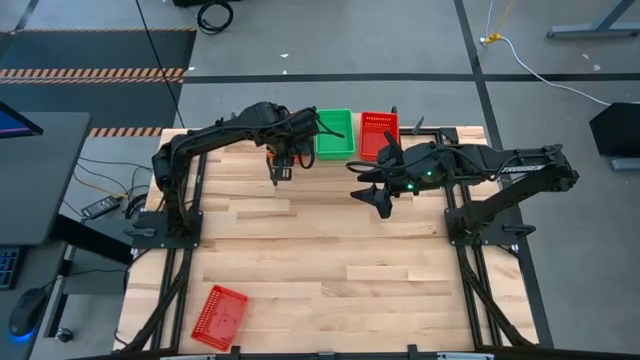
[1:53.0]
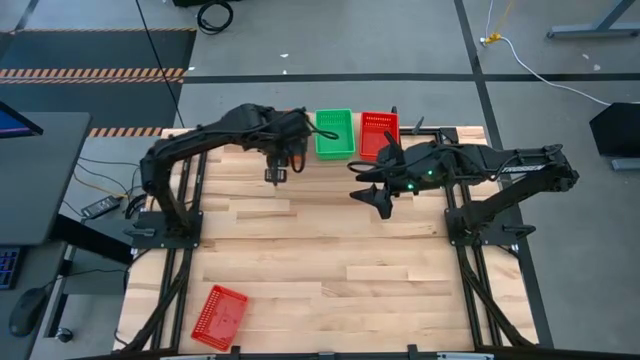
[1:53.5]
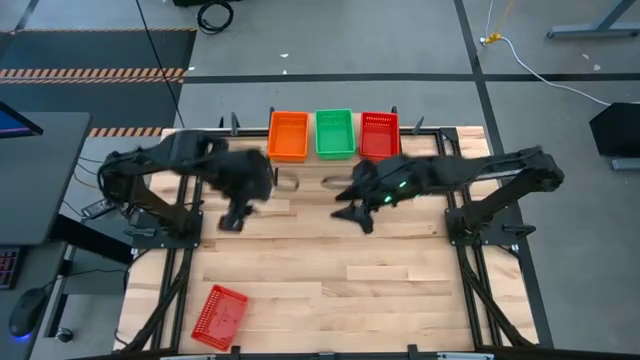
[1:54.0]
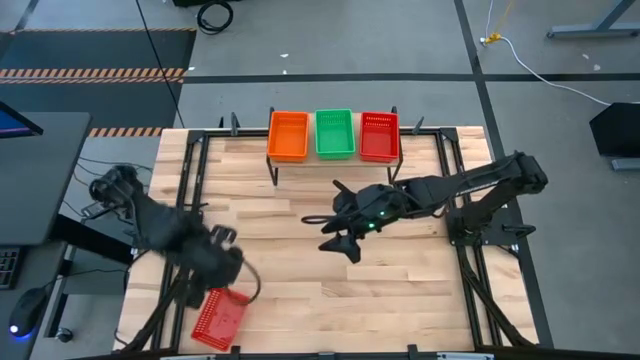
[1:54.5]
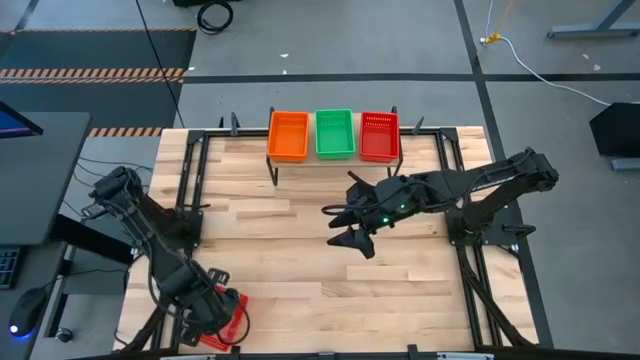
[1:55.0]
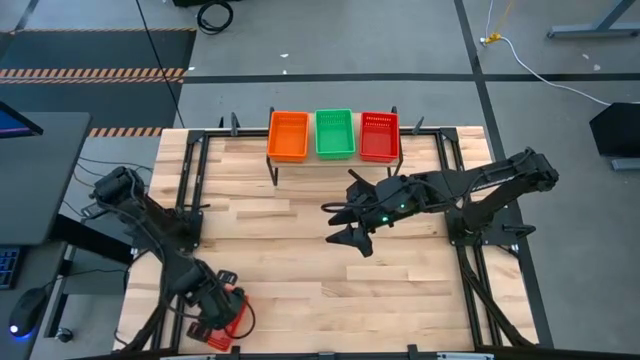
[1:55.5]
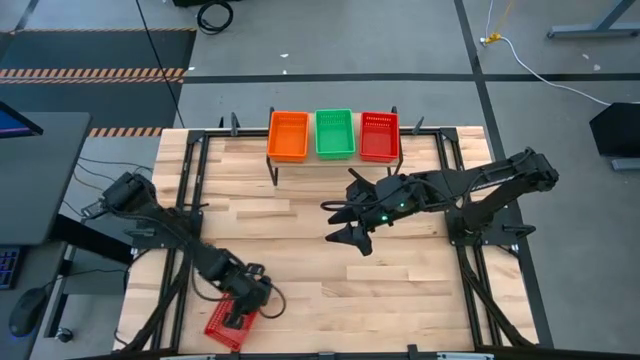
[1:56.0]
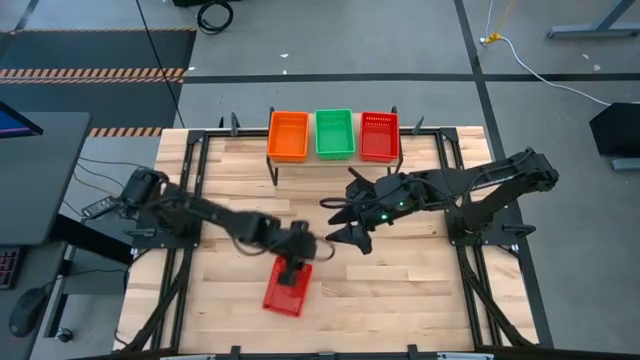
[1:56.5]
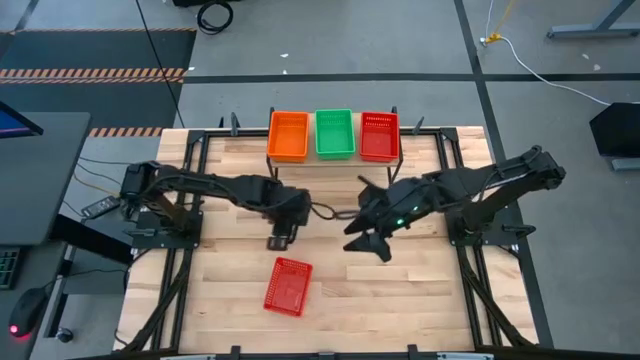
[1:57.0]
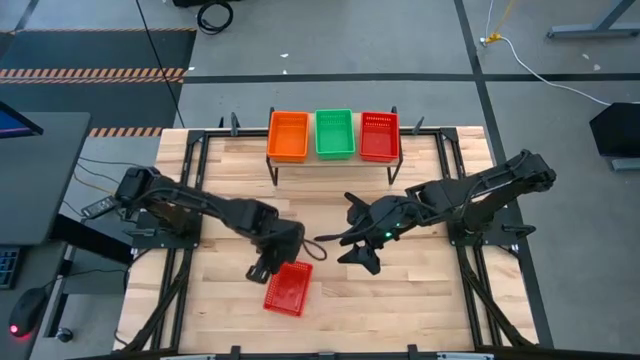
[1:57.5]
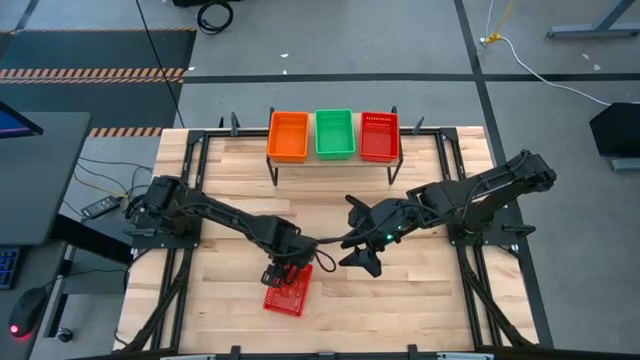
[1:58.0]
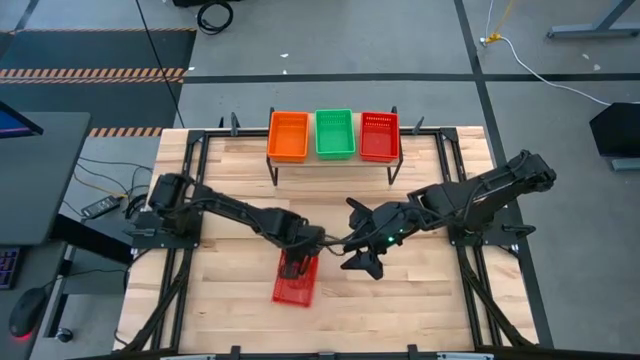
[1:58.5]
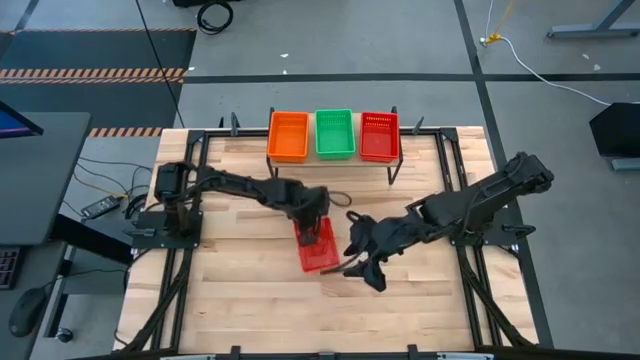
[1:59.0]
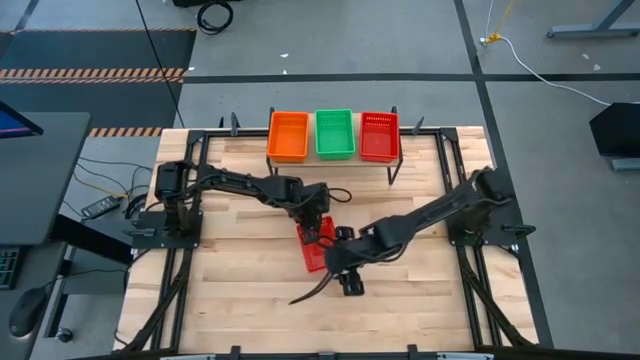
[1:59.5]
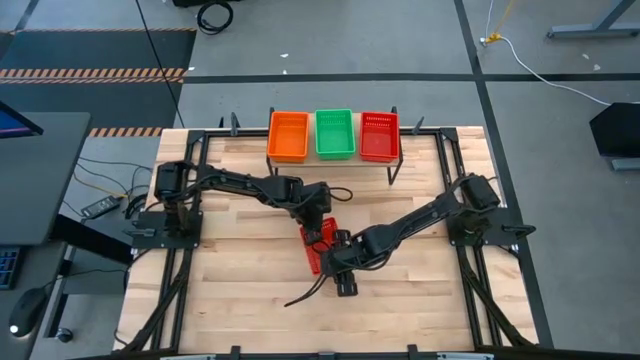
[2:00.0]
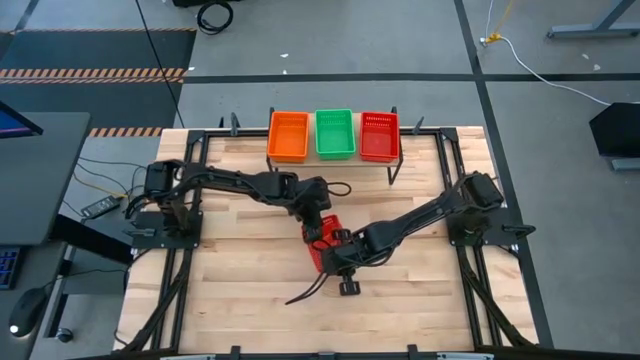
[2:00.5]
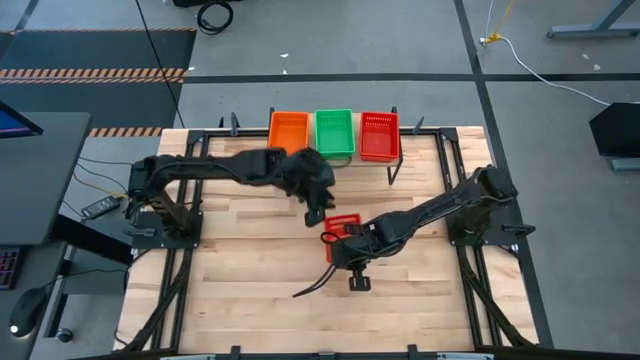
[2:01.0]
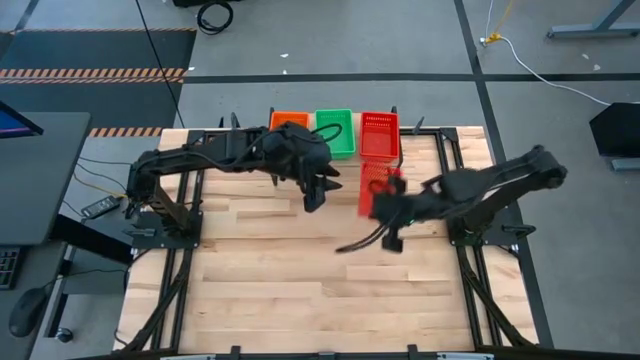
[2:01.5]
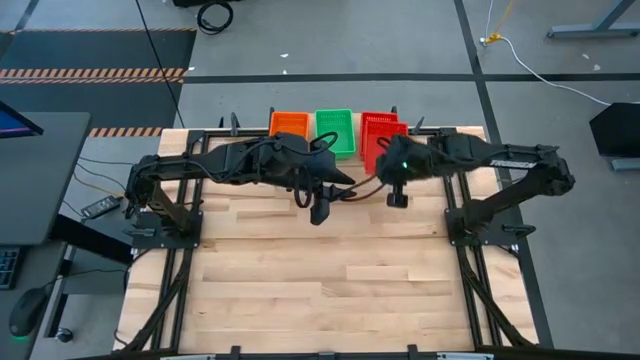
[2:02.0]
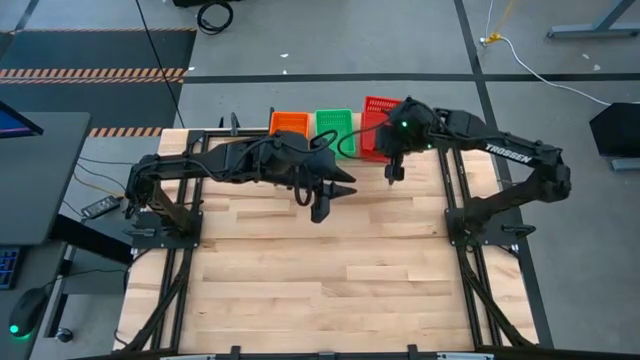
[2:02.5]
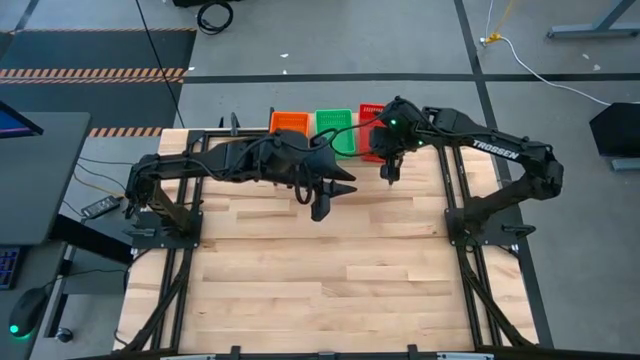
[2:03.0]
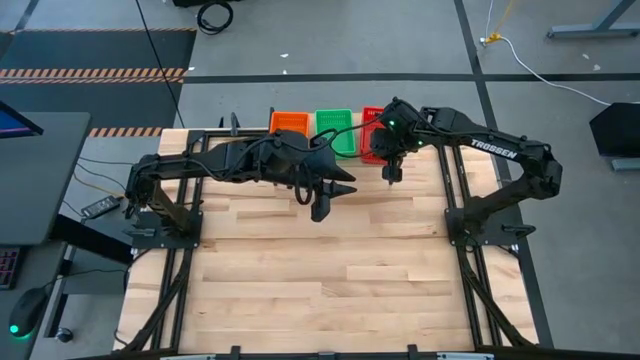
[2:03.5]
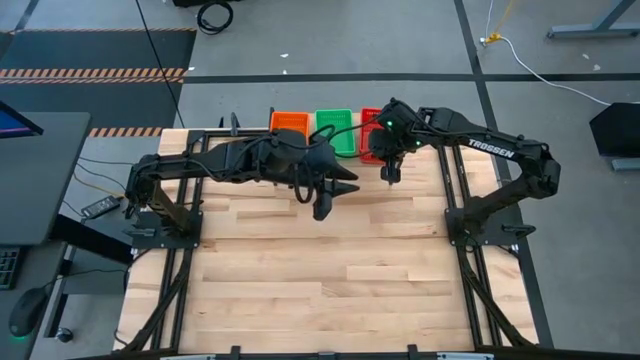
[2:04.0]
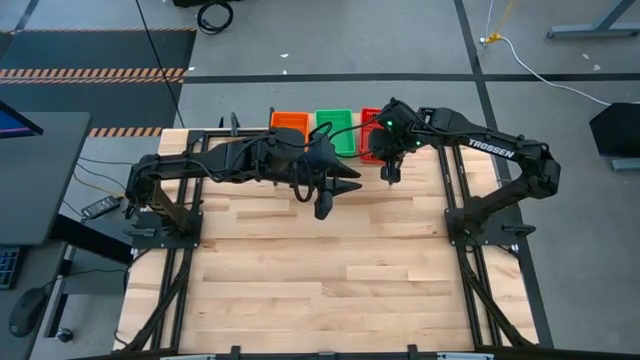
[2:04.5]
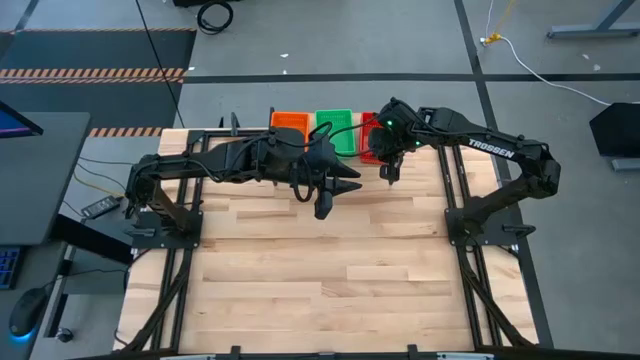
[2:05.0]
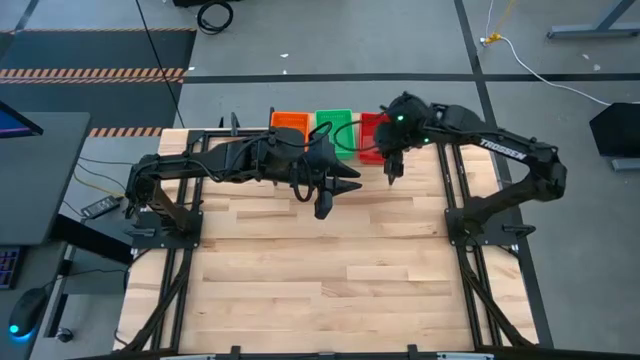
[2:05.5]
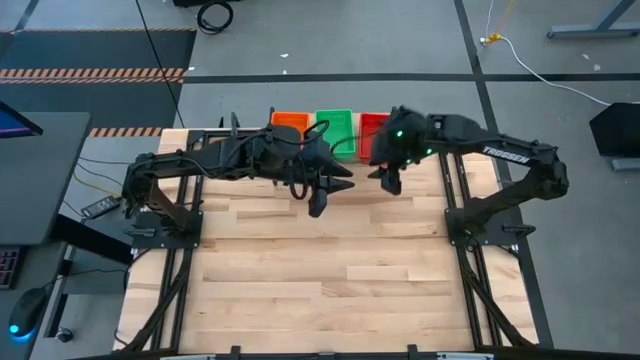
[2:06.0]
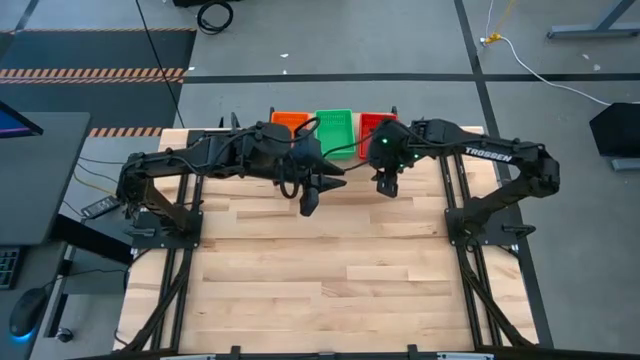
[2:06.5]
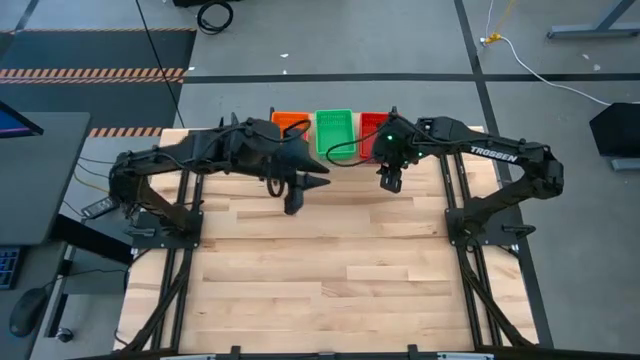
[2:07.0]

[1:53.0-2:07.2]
Task: Stack baskets on shelf by color
Stack the red bin on the red bins on the shelf

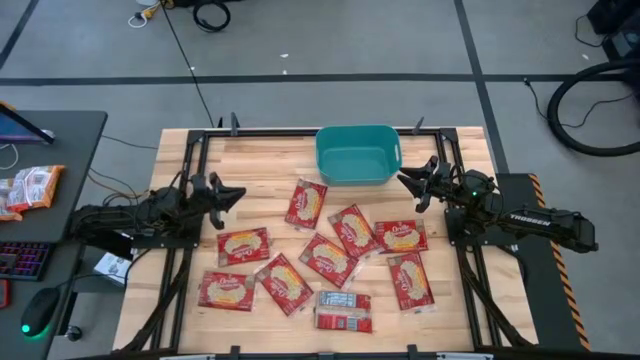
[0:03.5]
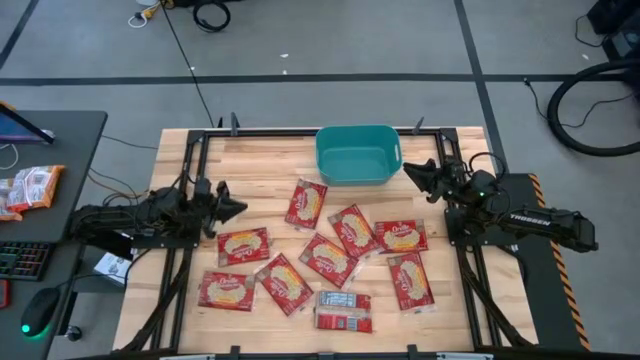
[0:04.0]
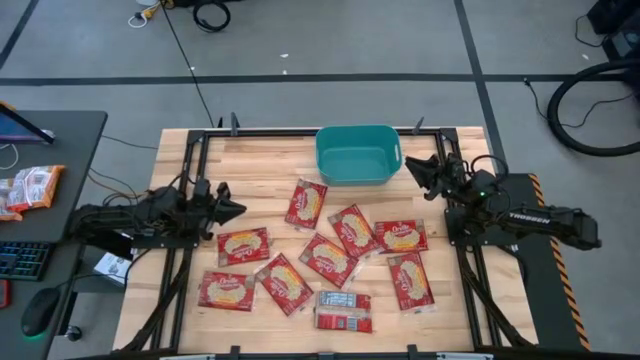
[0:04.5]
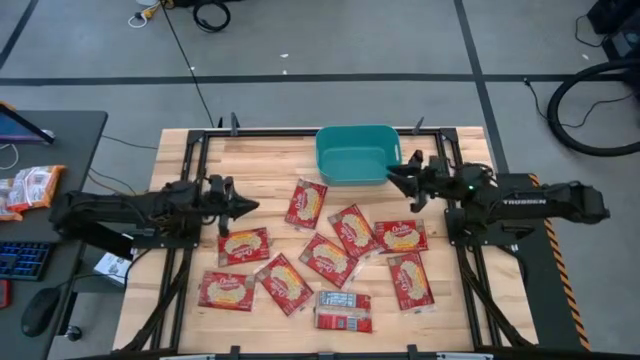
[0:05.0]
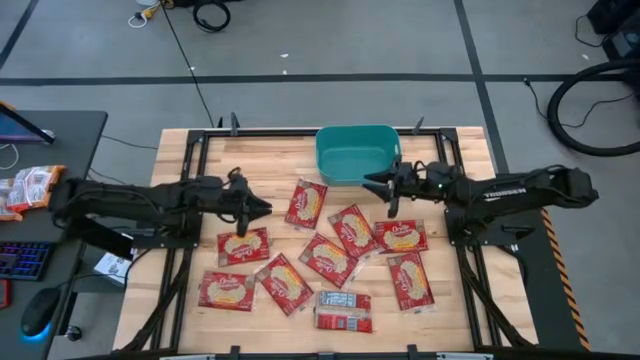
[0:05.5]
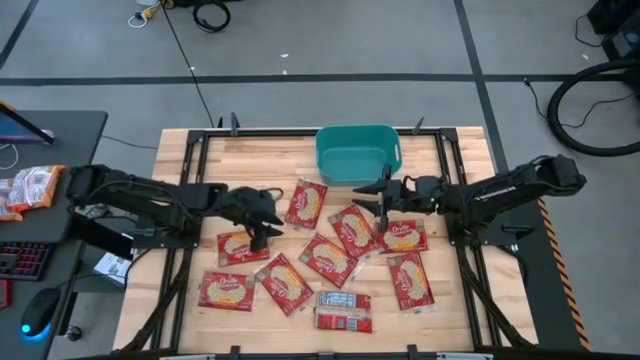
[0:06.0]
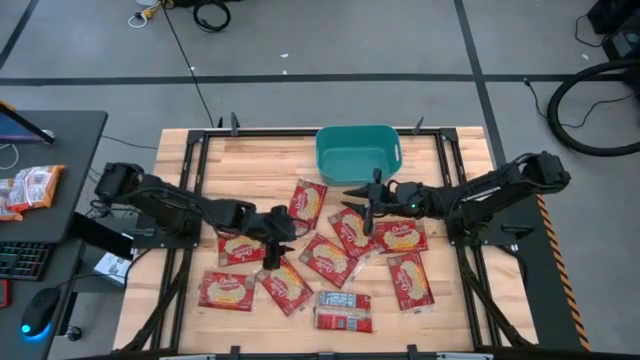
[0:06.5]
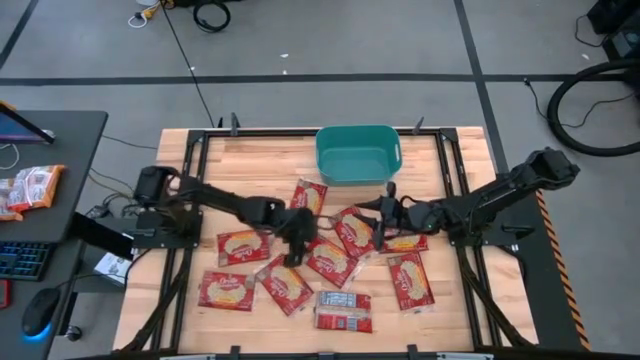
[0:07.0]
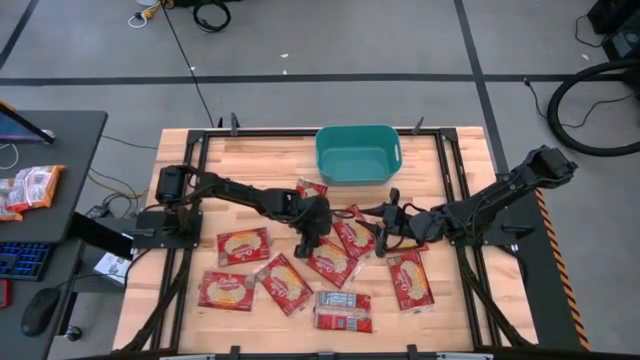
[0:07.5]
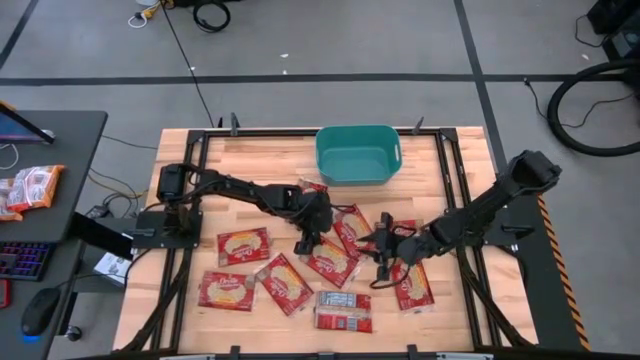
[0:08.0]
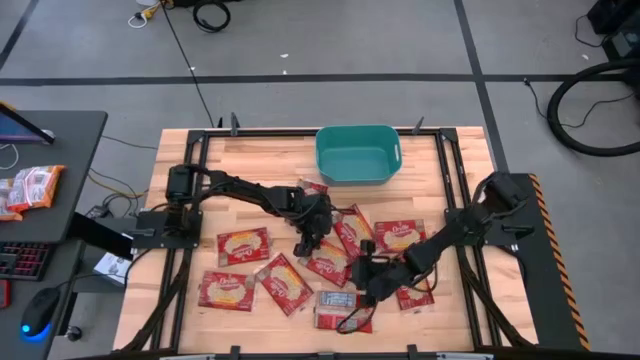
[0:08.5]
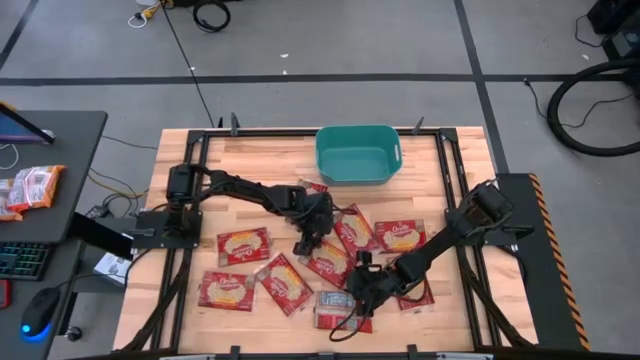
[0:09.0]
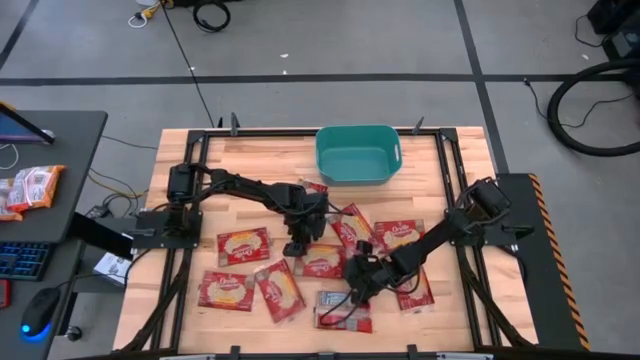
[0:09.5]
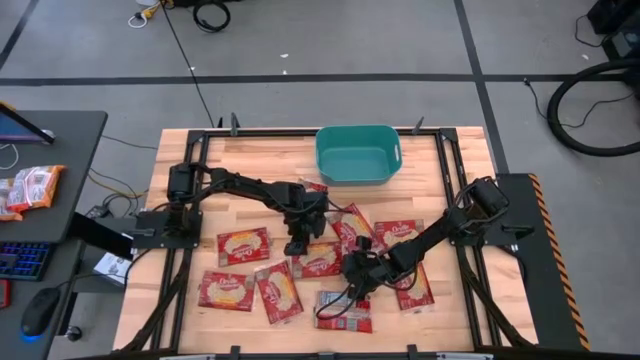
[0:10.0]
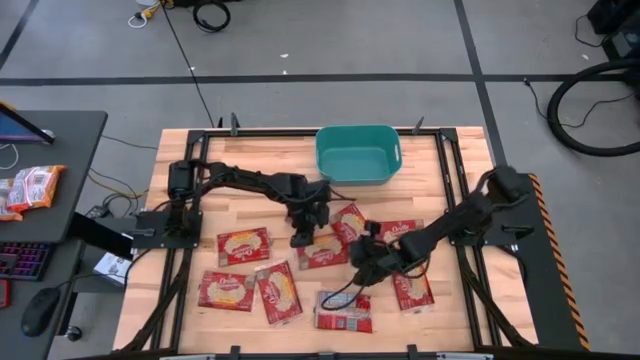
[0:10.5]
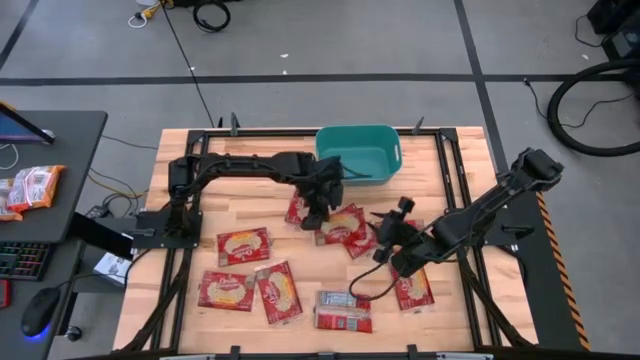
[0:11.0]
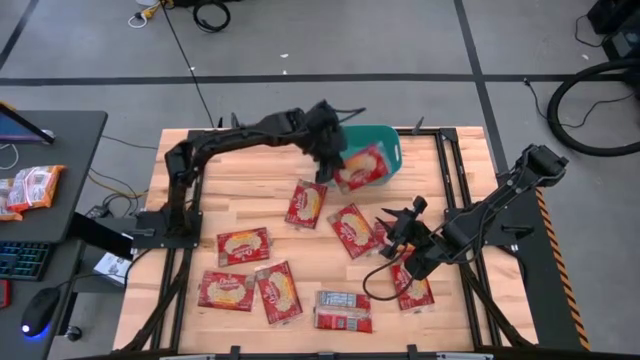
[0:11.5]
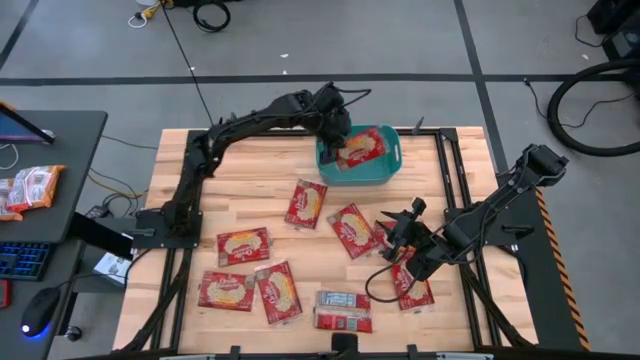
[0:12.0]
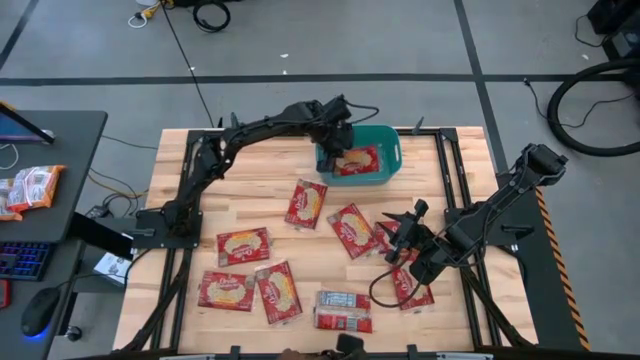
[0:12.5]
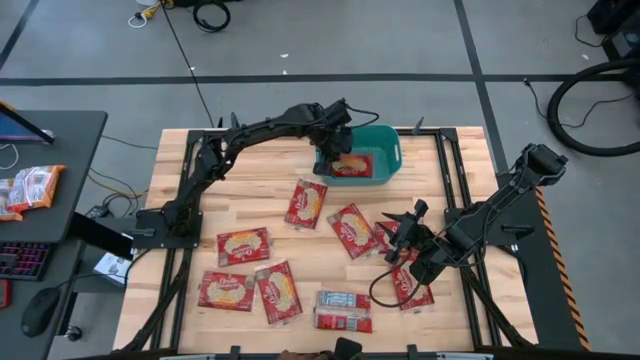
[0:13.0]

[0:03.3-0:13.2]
Task: Sort popcorn bags into baskets
Put the red popcorn bag into the blue bin
